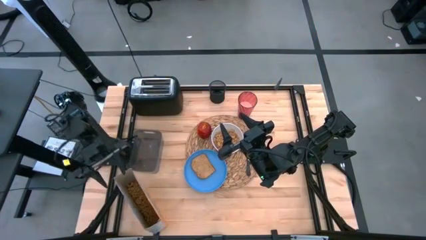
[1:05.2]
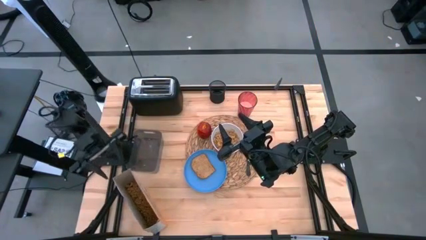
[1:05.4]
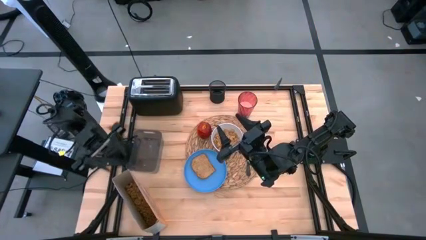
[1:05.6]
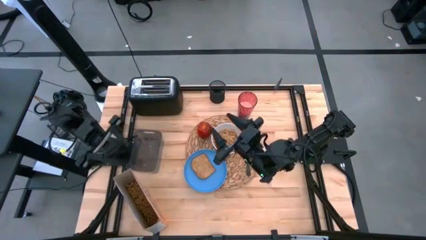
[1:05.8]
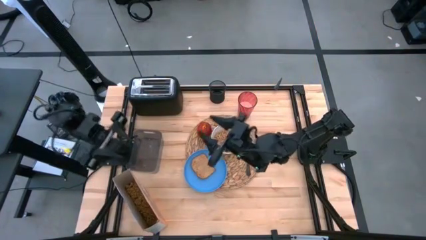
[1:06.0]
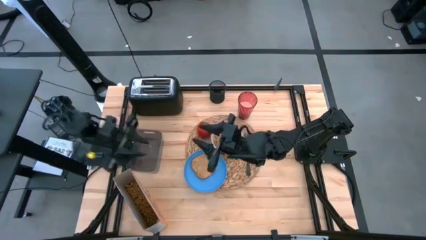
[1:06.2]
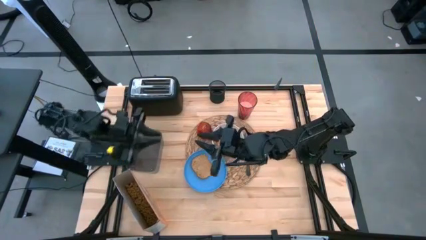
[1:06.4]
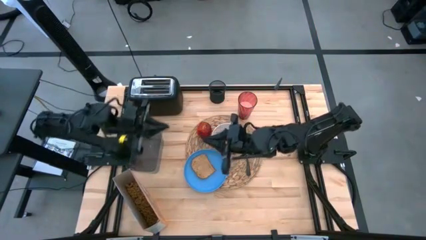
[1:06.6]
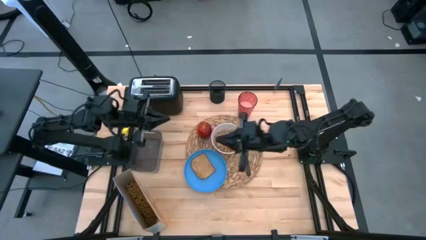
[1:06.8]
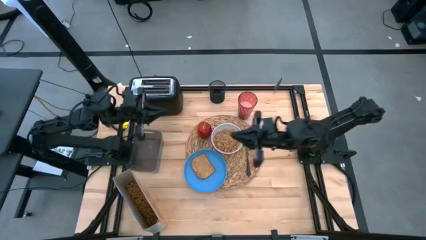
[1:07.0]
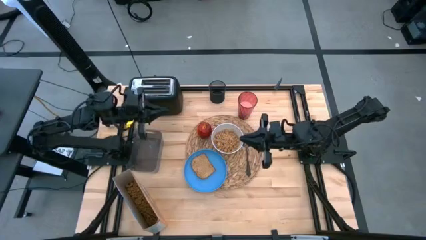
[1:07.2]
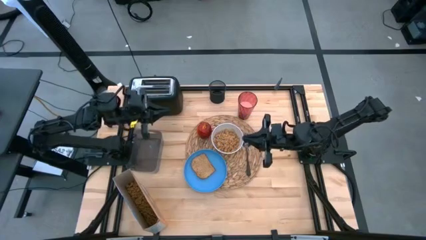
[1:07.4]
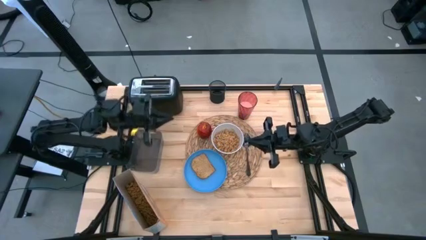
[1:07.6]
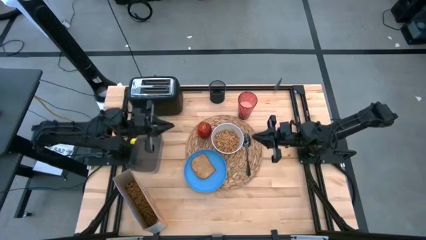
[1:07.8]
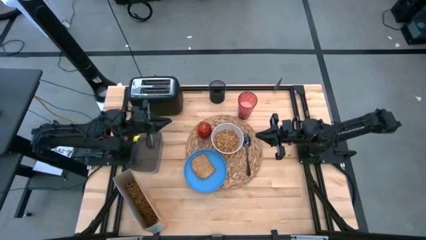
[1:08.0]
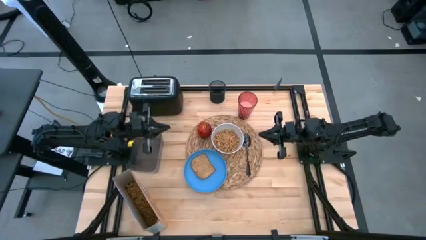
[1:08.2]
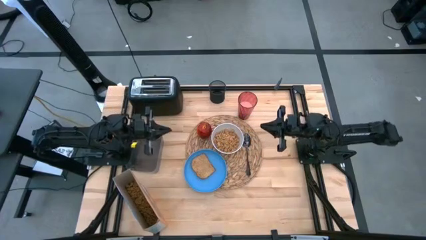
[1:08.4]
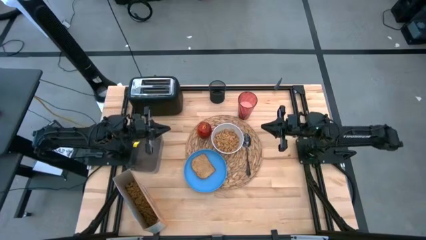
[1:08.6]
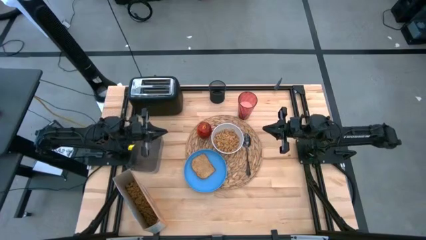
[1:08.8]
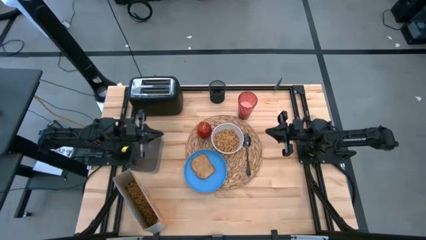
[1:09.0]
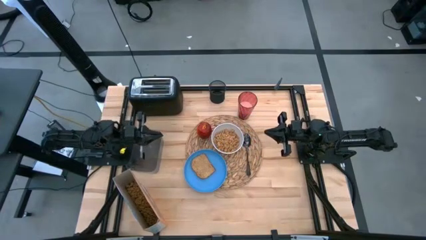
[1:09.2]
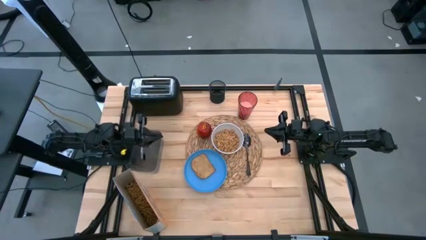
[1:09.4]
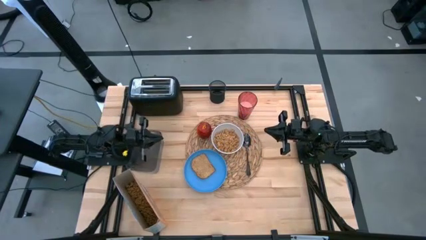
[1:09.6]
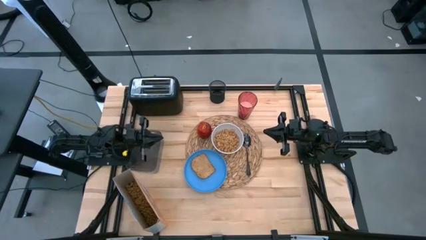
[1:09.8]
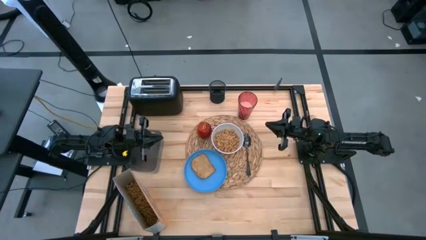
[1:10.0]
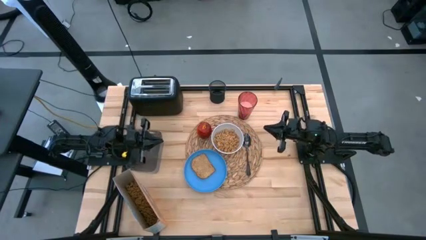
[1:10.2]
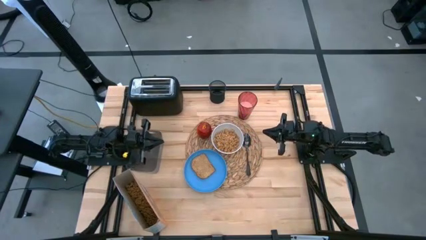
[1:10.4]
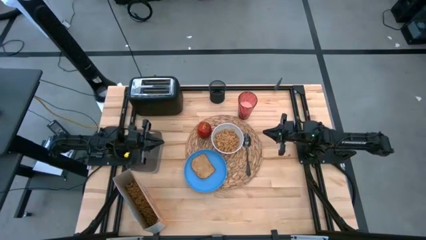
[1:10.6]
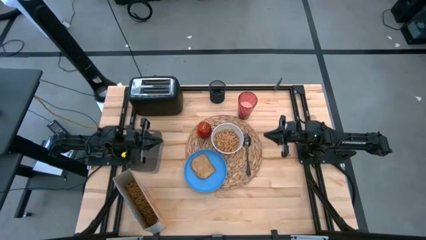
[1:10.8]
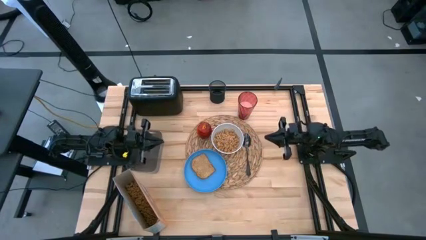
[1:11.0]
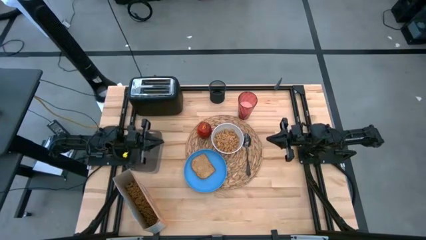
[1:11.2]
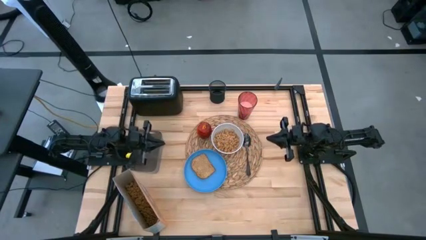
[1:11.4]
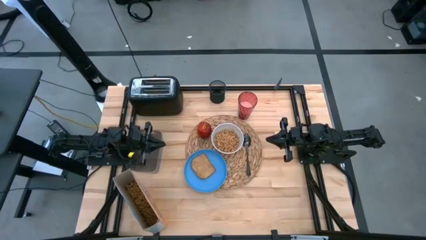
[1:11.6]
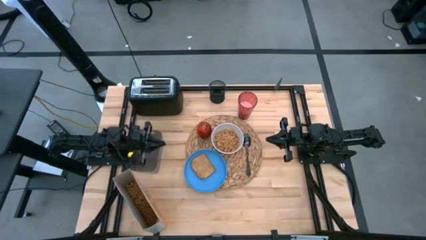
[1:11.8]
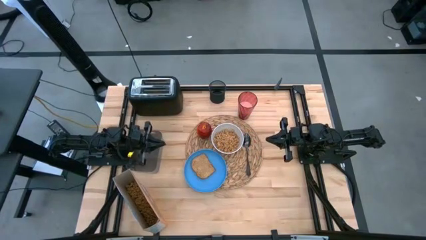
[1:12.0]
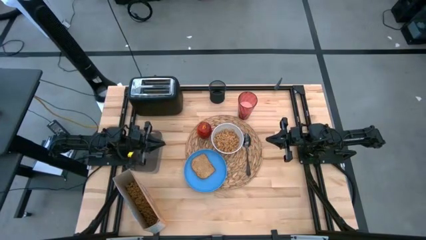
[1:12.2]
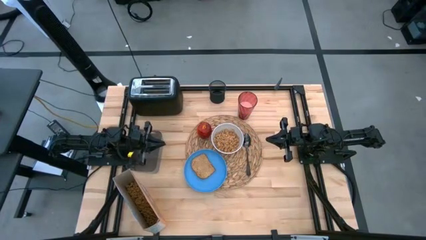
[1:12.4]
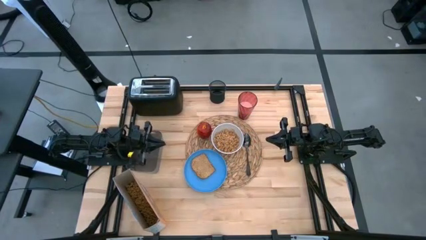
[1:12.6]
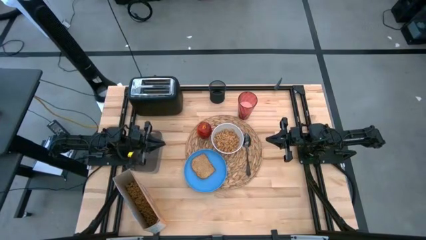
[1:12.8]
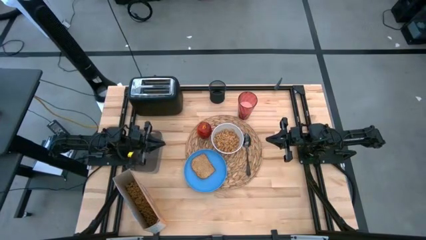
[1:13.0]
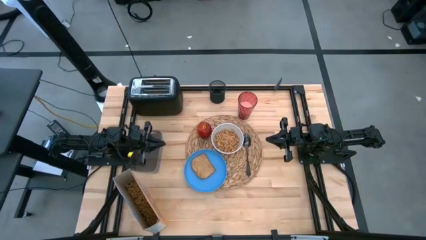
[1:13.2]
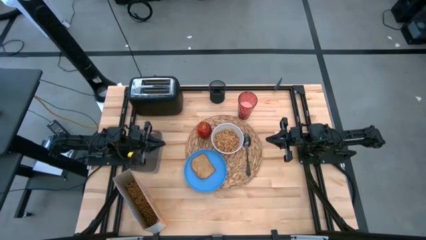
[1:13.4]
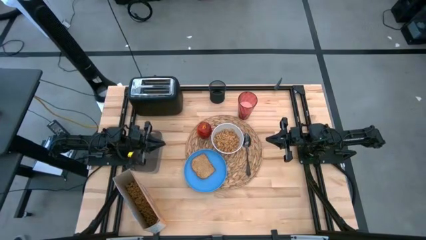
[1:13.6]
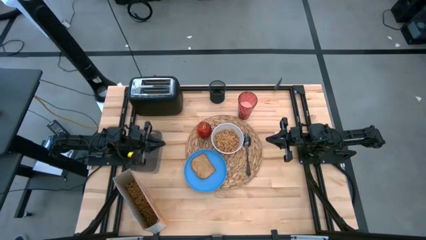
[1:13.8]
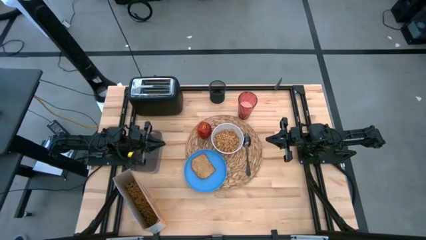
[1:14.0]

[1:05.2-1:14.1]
Task: Arrange a breakfast setting
Return to Home Position
